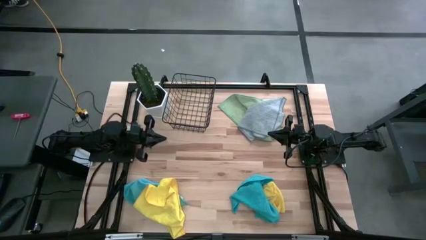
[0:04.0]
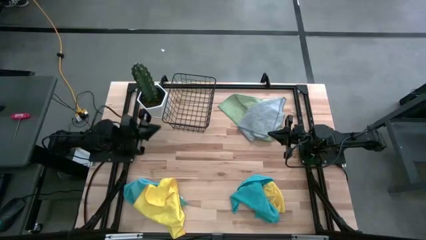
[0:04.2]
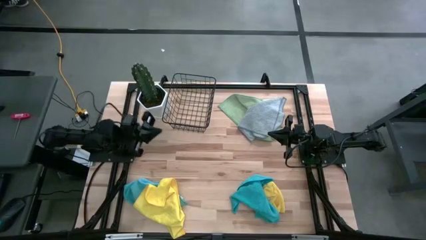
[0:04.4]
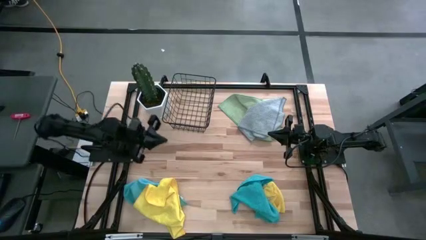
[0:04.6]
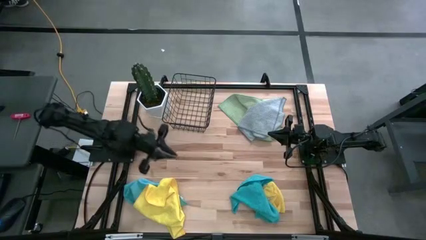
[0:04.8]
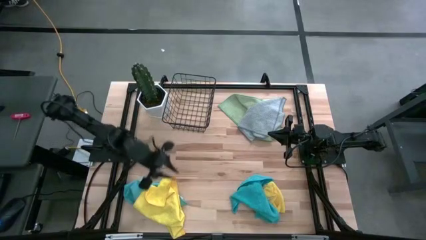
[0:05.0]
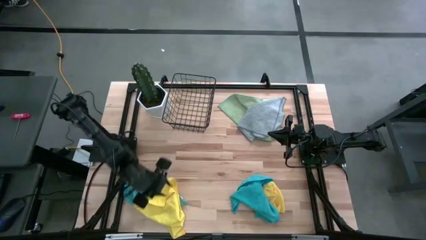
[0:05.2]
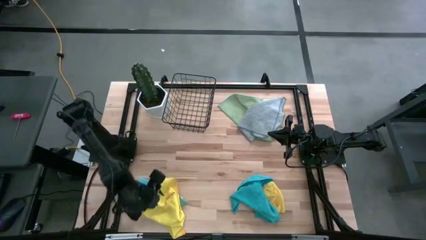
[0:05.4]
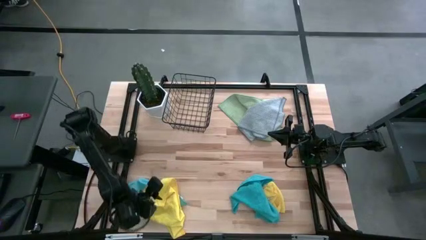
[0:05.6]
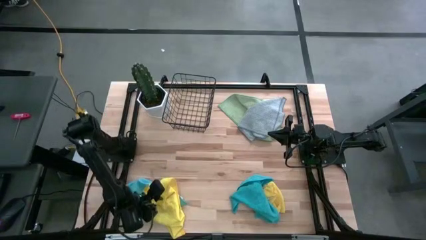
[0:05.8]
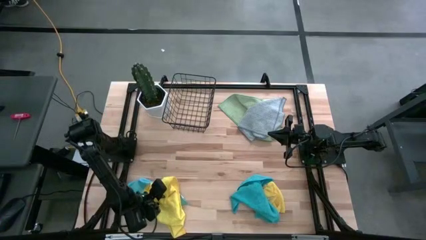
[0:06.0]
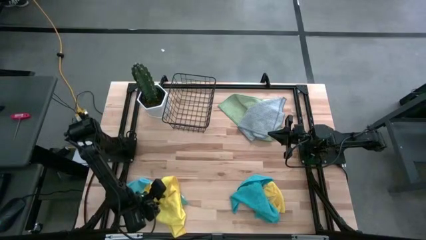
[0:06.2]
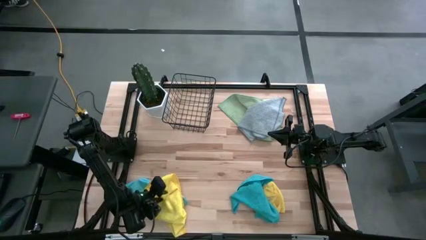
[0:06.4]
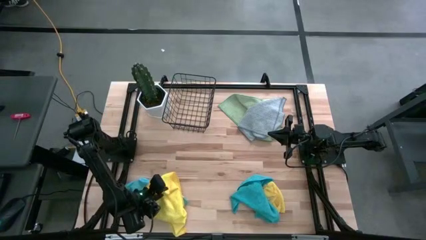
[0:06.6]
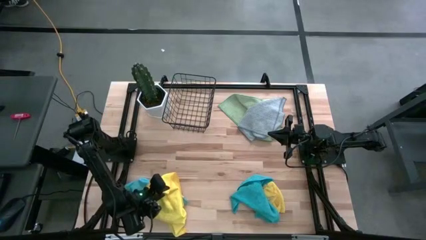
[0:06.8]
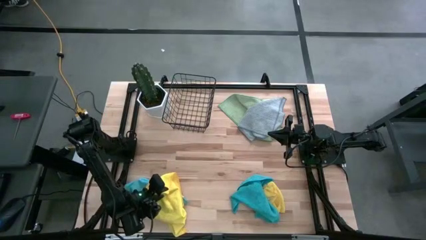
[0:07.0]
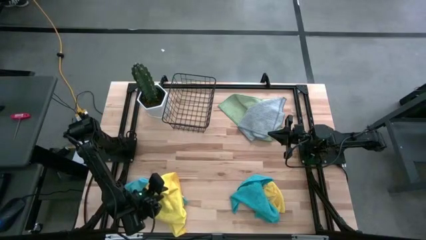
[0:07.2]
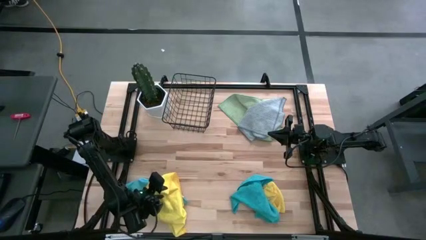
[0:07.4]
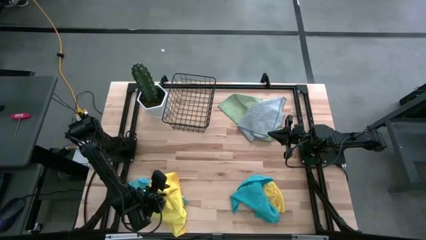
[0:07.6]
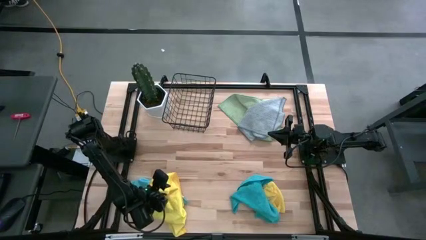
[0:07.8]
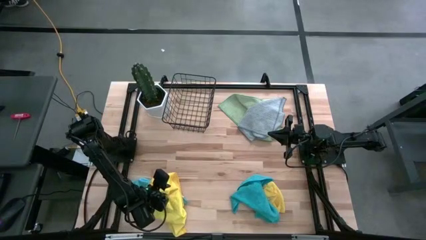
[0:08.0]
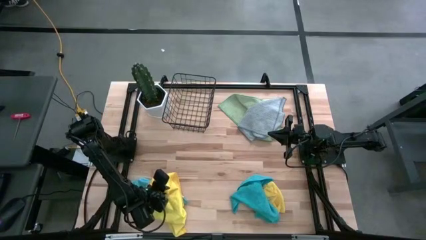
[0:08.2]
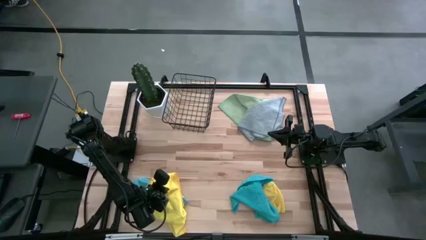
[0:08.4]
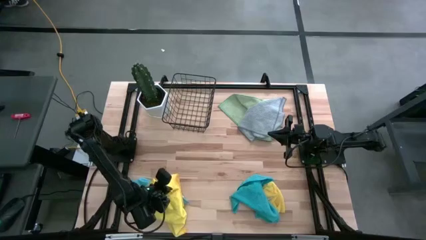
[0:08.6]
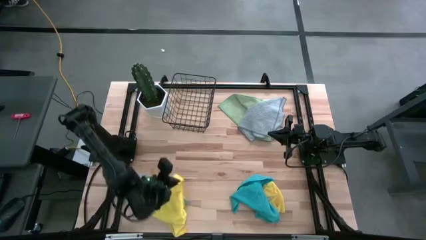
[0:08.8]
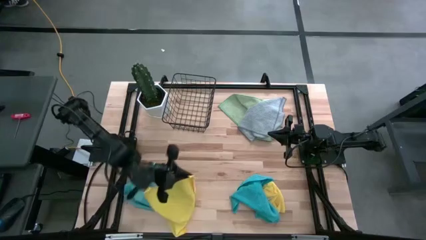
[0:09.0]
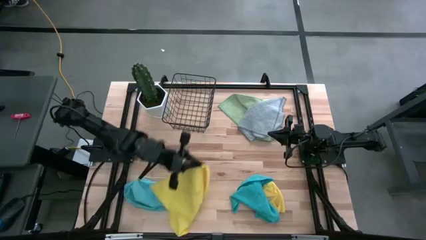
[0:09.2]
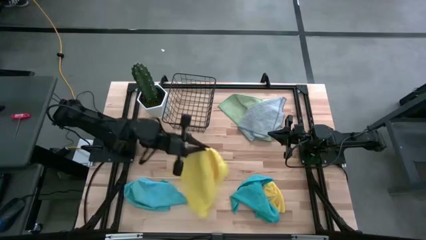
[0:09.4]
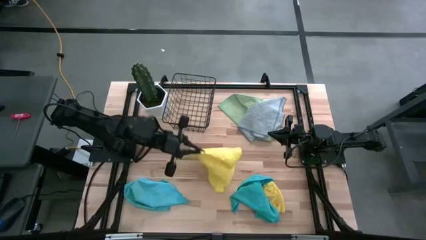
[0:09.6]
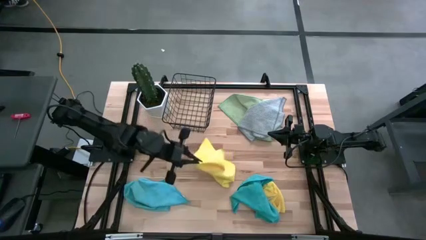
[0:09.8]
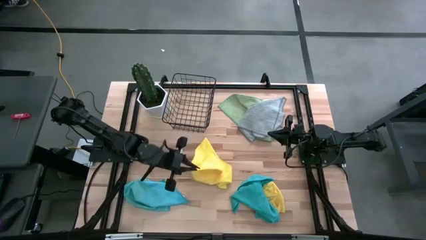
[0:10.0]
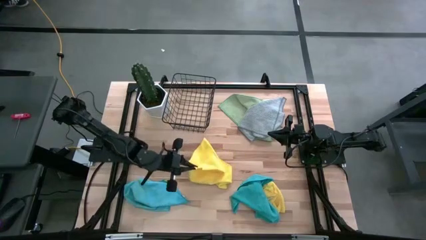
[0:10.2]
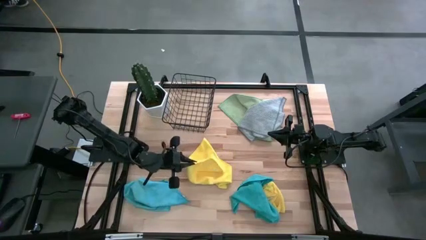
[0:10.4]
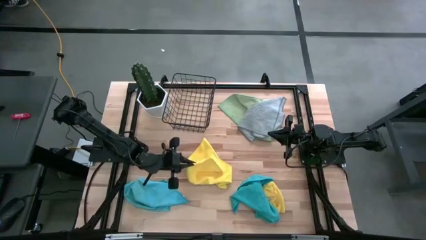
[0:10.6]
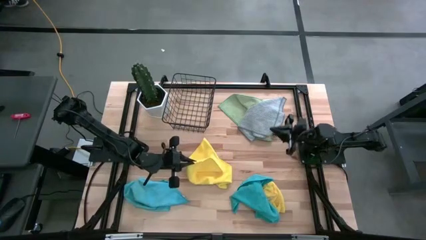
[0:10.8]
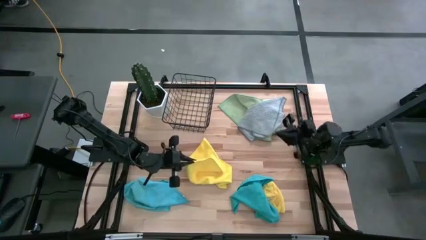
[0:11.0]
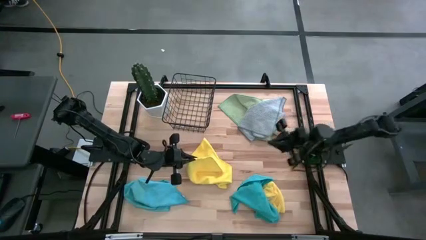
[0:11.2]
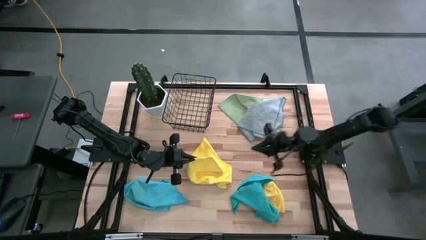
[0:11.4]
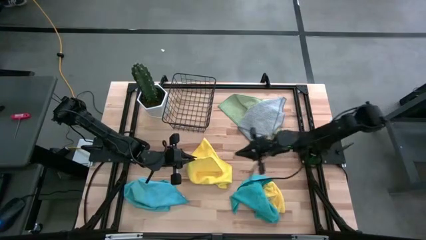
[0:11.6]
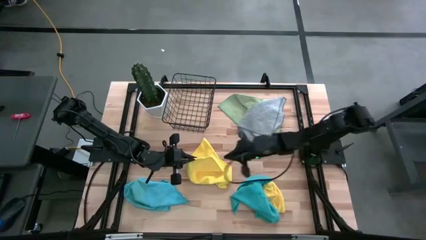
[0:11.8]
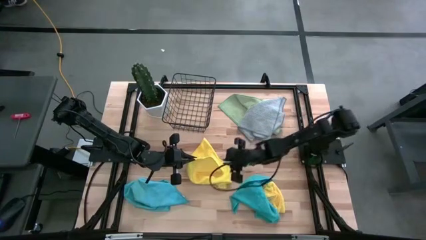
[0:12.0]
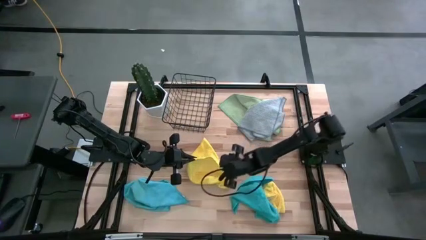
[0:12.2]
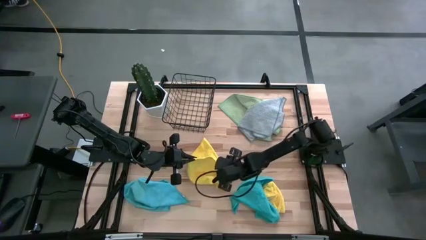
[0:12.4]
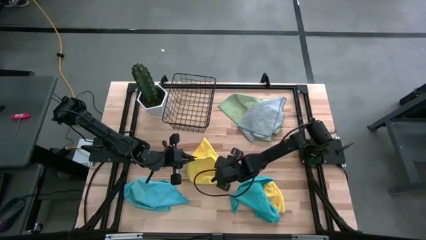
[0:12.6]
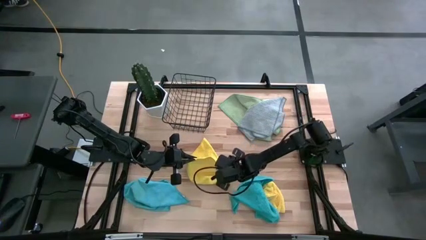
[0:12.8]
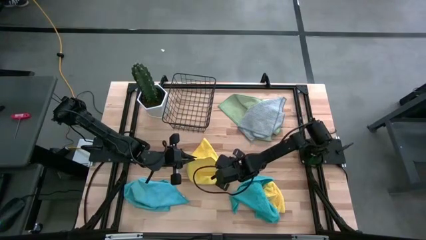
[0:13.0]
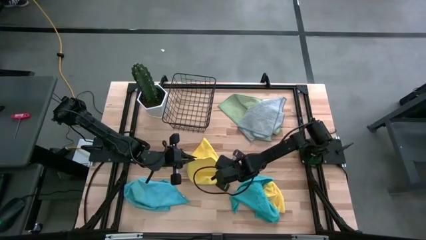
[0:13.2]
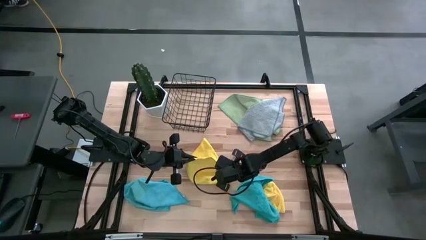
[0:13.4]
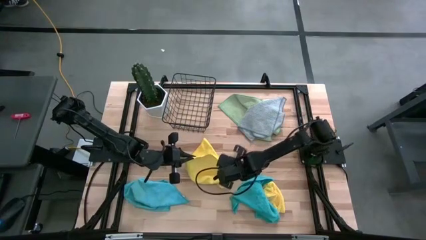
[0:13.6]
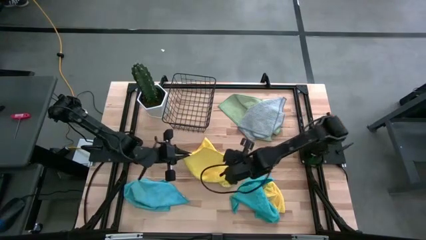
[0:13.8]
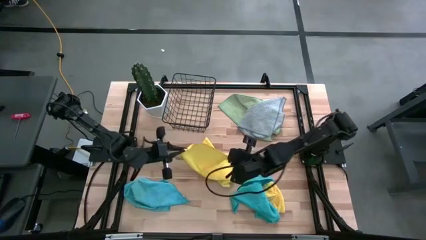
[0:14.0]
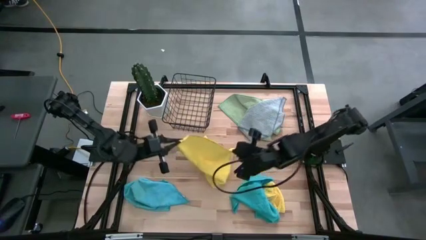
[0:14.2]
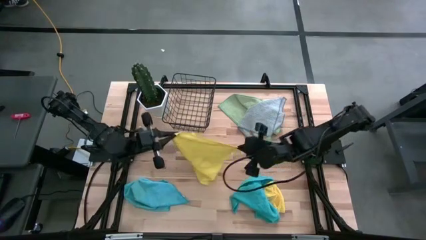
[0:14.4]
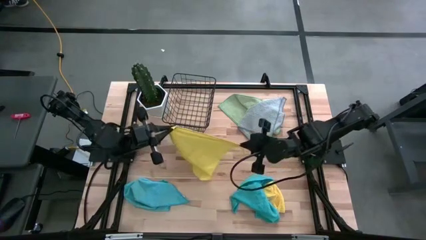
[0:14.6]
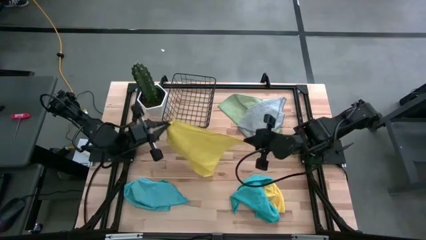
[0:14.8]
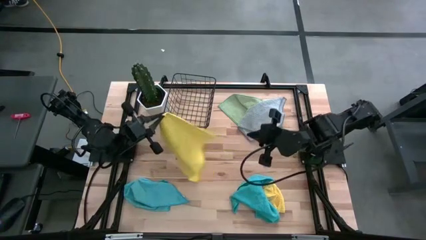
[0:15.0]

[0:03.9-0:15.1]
Task: Fold microfiber towels
Fold the left yellow microfiber cloth
